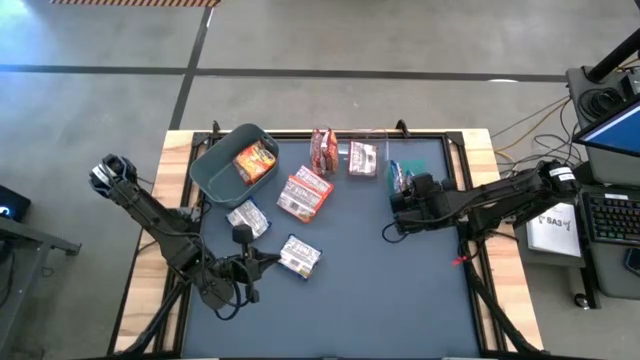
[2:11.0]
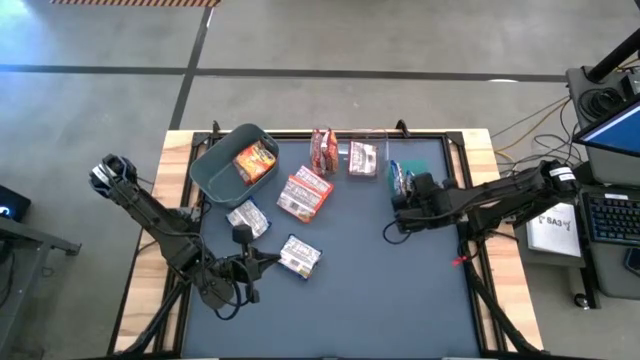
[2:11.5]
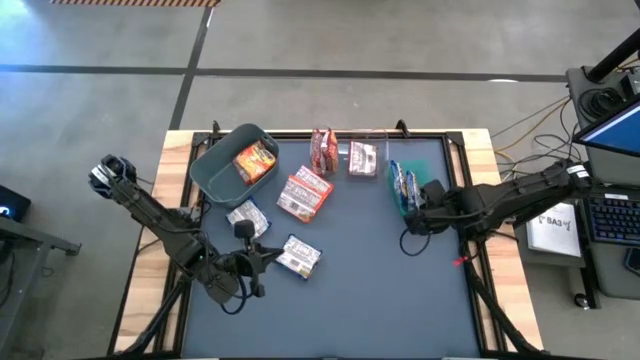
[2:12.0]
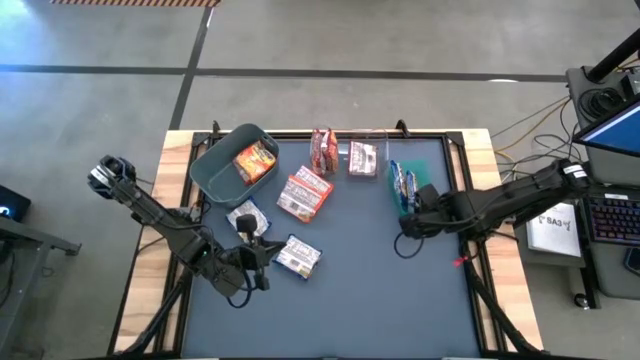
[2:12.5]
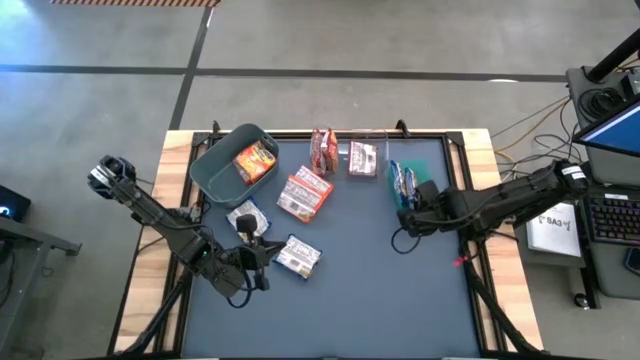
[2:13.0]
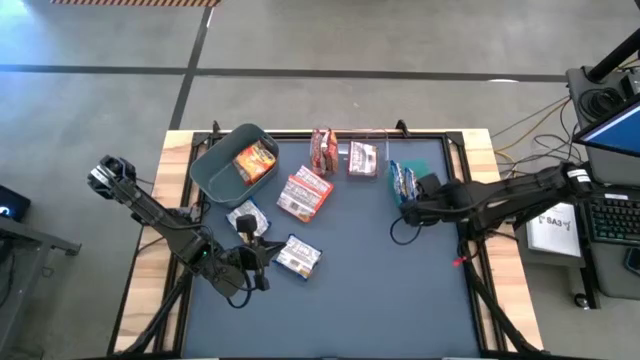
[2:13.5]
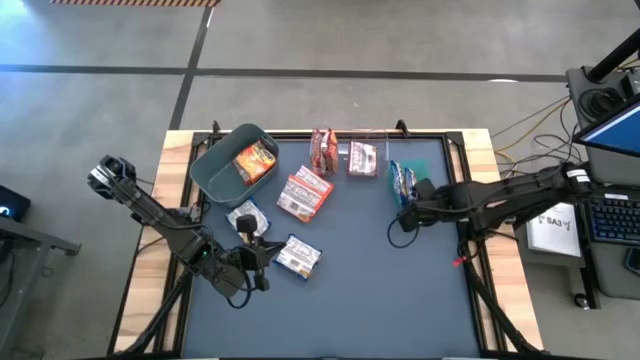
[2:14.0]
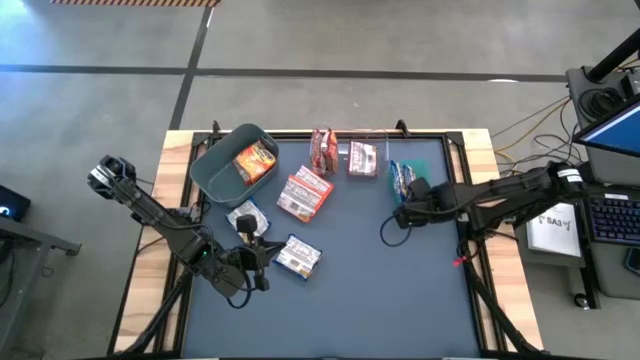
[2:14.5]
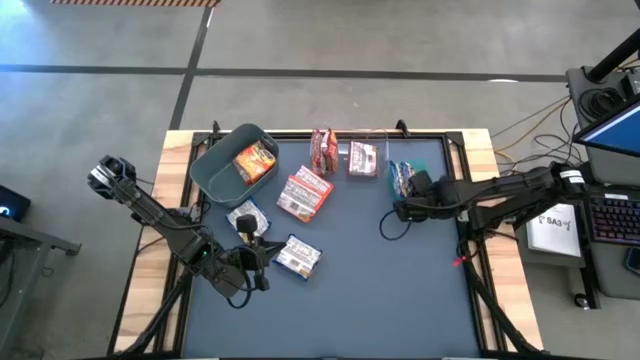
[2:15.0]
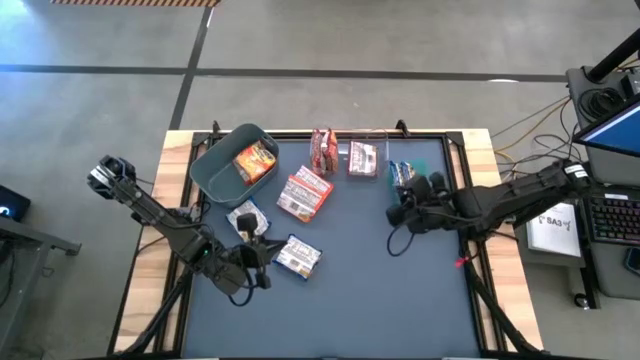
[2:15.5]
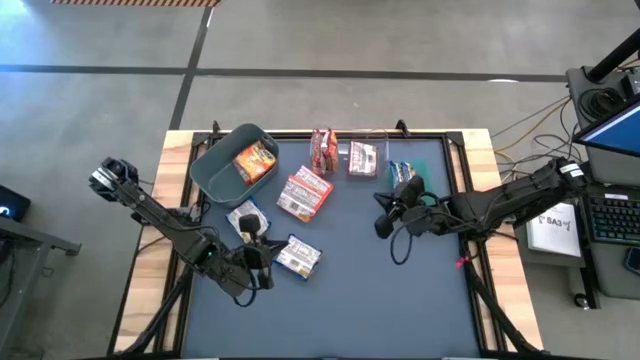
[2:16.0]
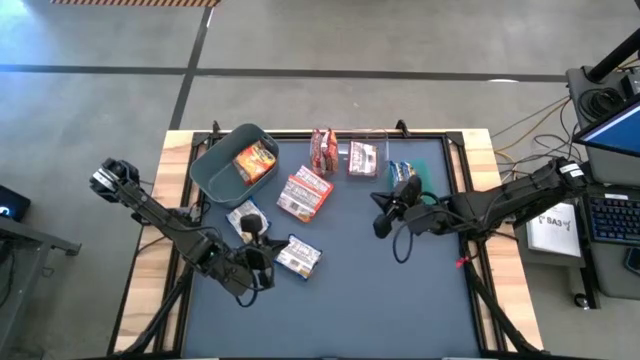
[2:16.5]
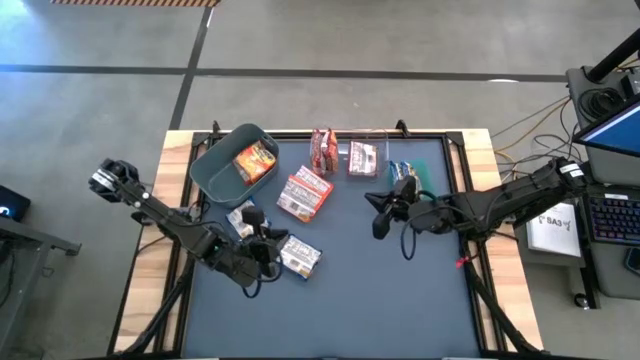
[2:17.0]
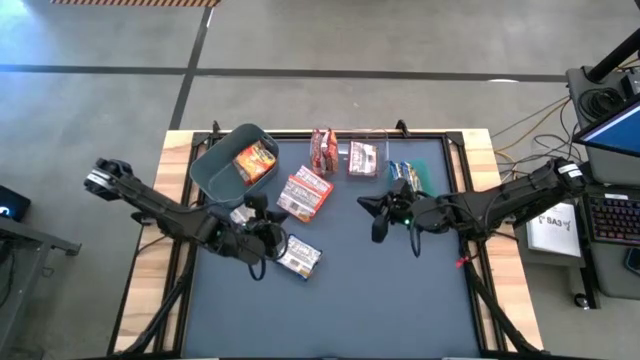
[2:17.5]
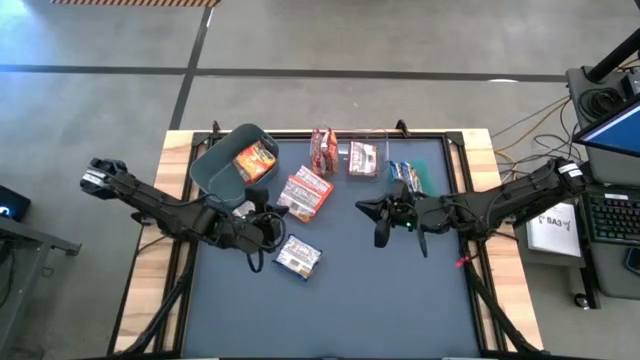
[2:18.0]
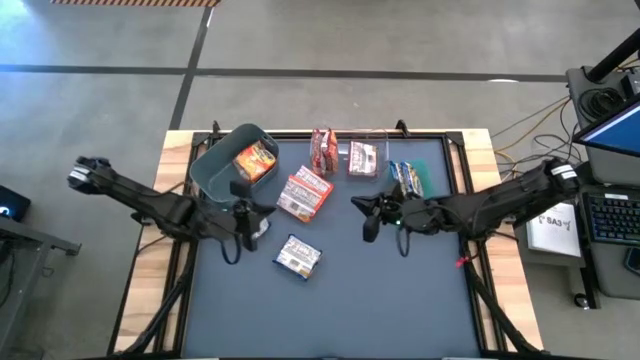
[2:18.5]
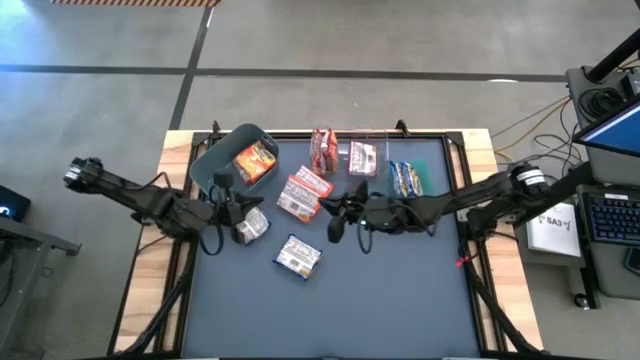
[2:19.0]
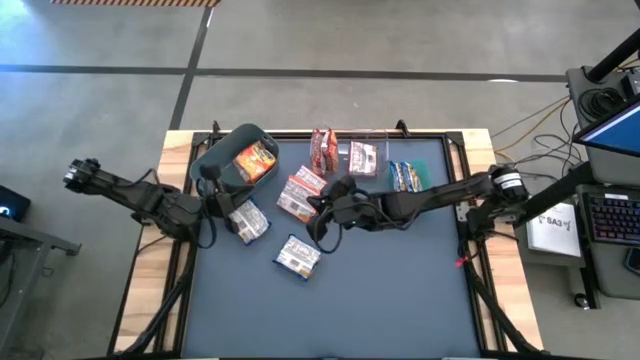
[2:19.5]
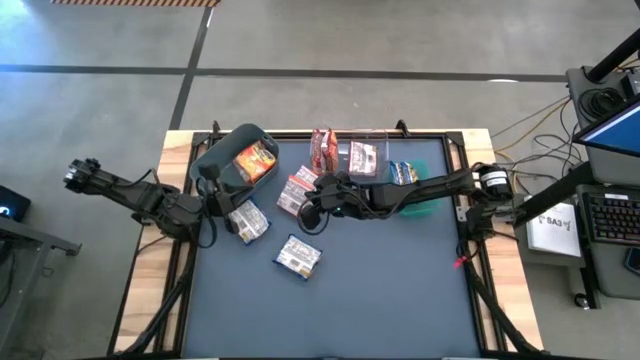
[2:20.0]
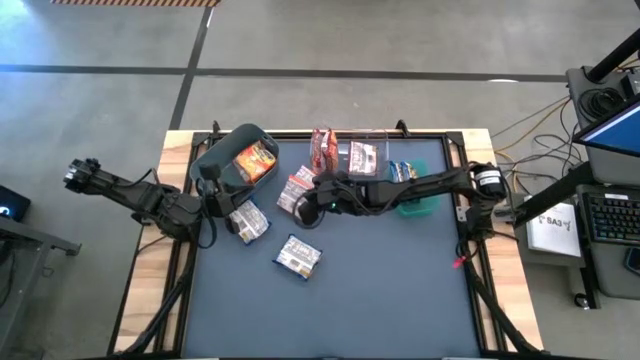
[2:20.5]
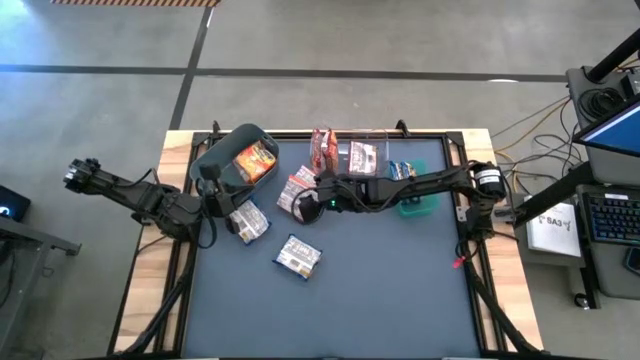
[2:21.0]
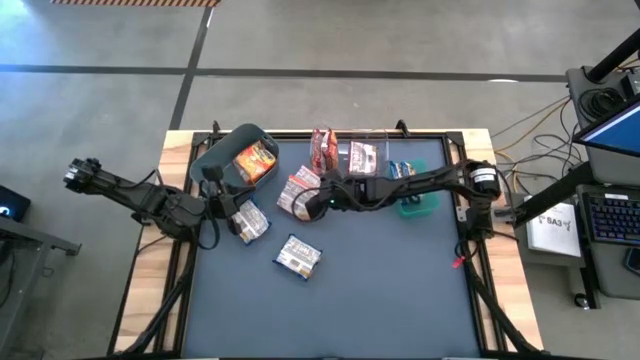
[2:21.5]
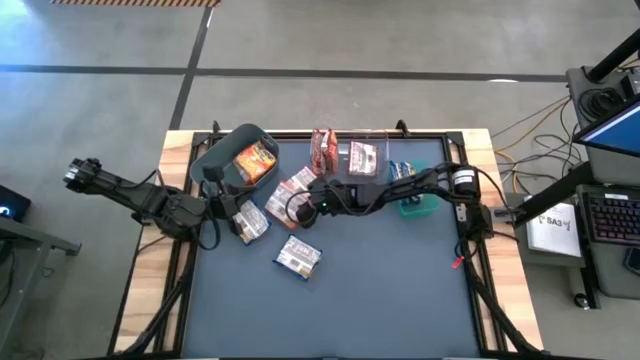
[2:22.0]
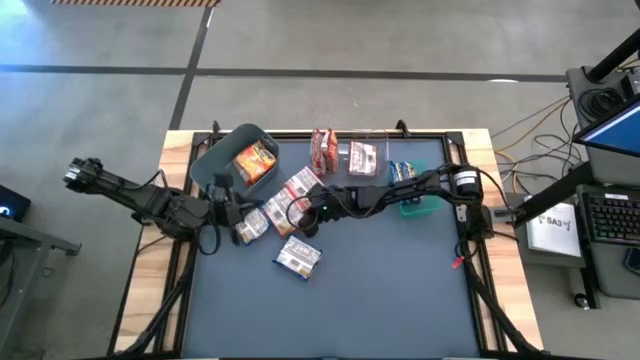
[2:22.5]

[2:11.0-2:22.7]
Task: Sort Maruchan noodles
Put the orange noodle pack into the gray bin

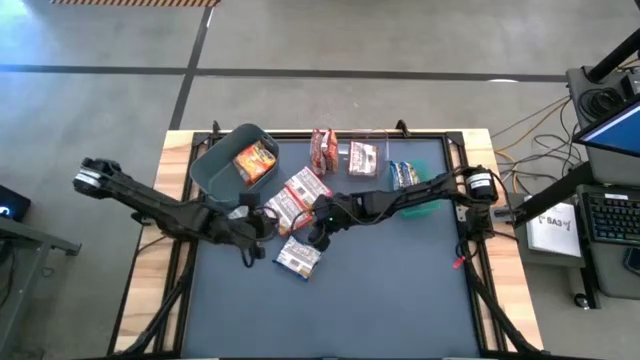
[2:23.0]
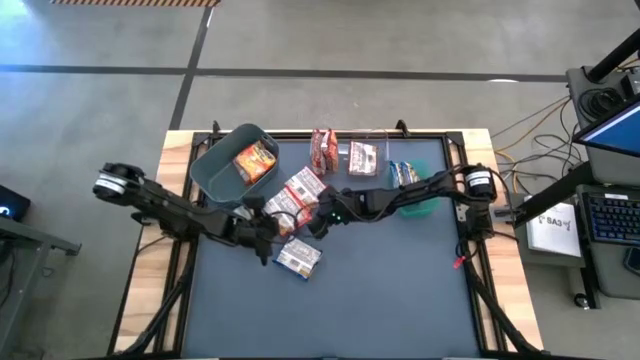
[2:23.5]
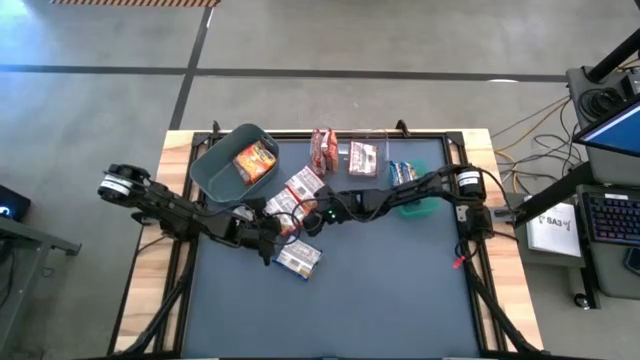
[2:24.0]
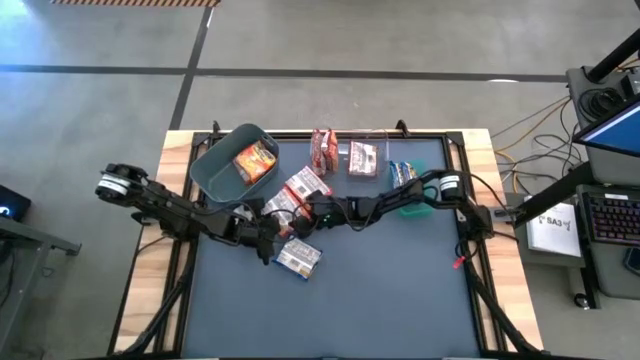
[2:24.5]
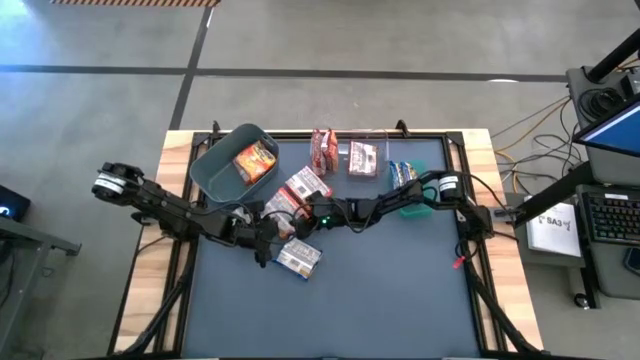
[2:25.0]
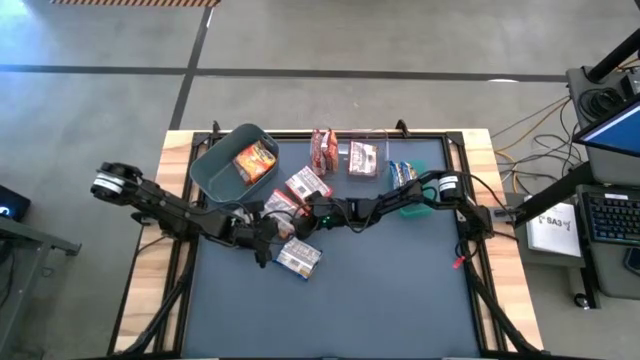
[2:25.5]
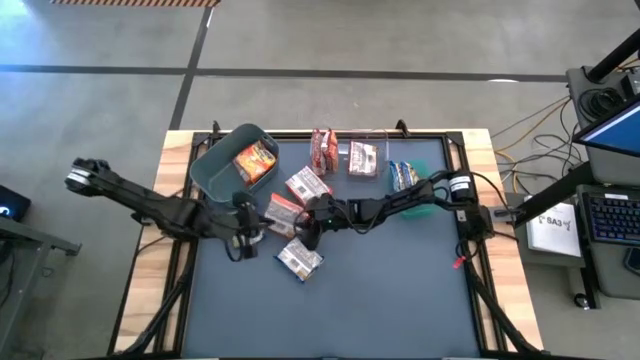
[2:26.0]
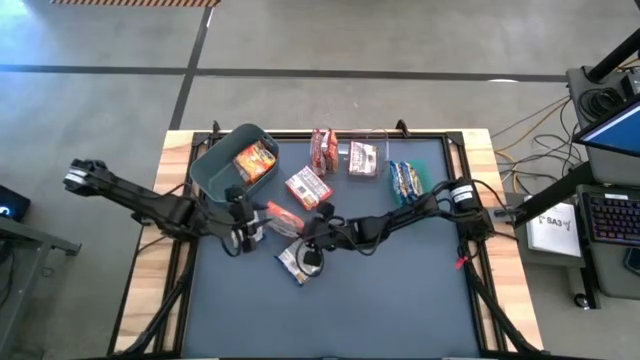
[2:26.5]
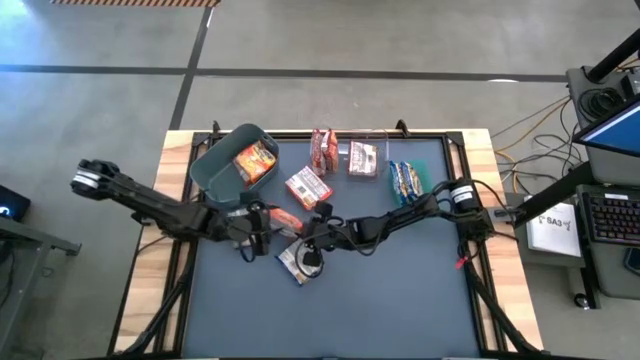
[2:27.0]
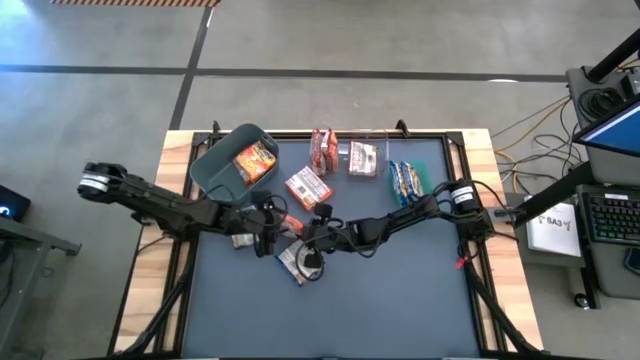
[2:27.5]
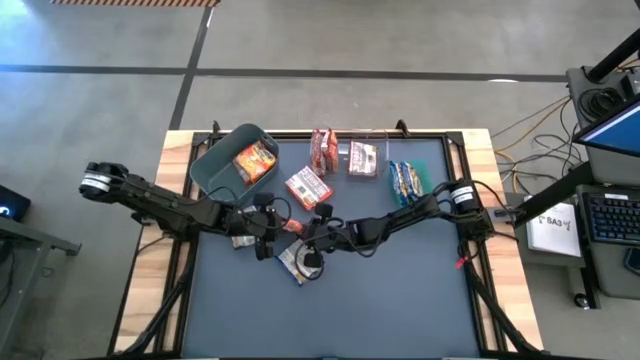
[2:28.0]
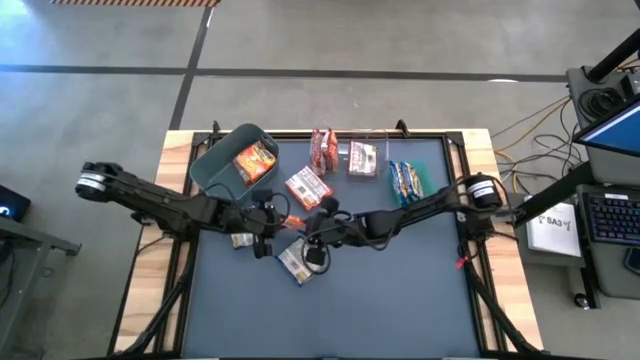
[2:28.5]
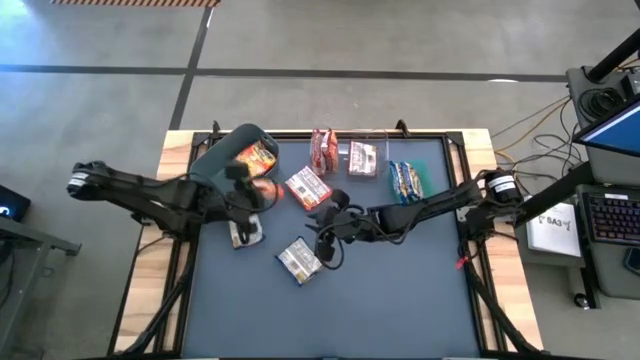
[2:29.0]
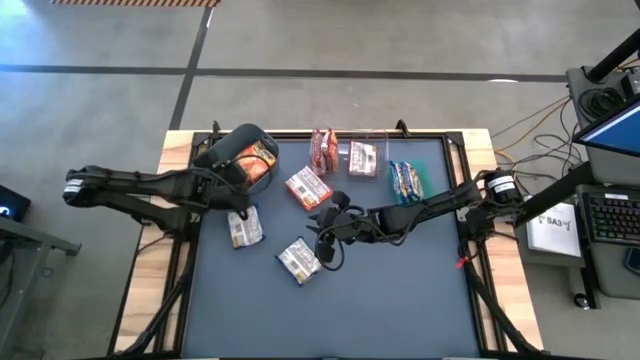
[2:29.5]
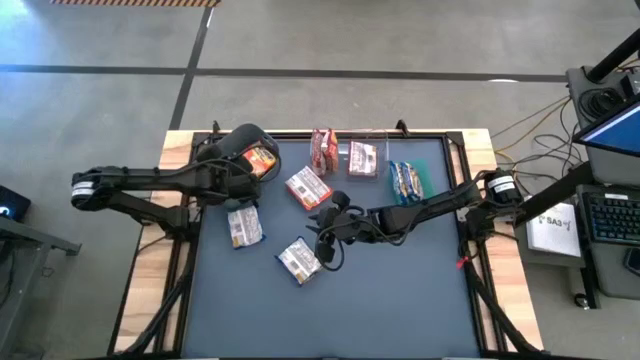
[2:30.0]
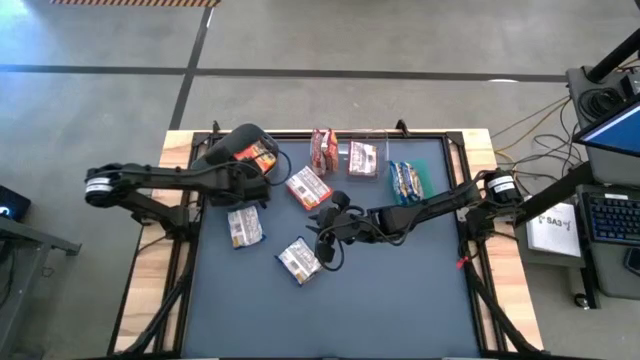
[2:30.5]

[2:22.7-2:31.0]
Put the orange noodle pack into the gray bin
